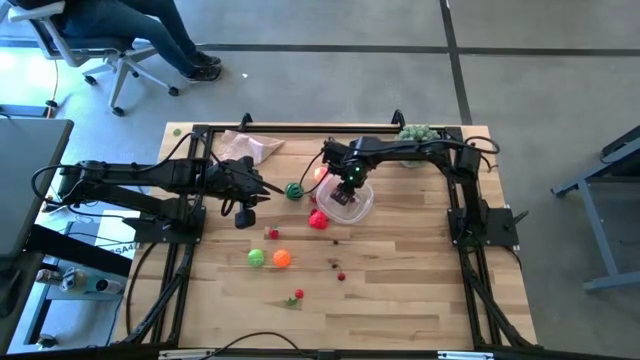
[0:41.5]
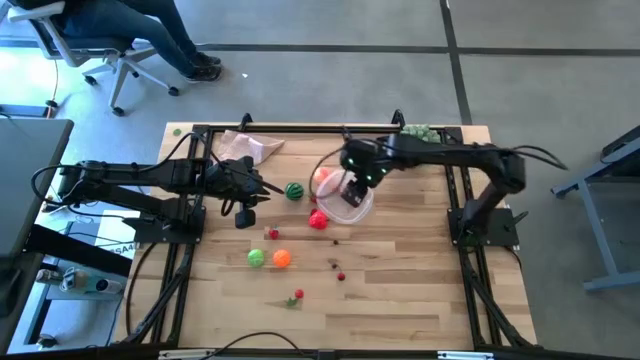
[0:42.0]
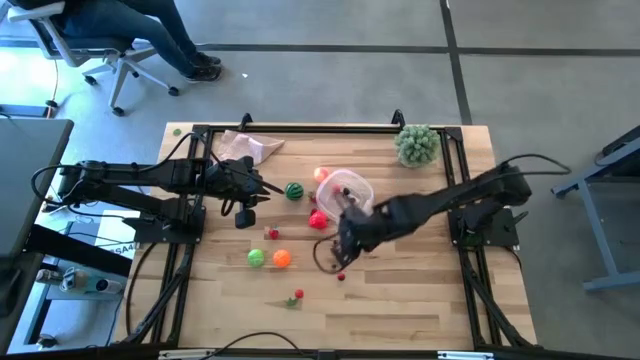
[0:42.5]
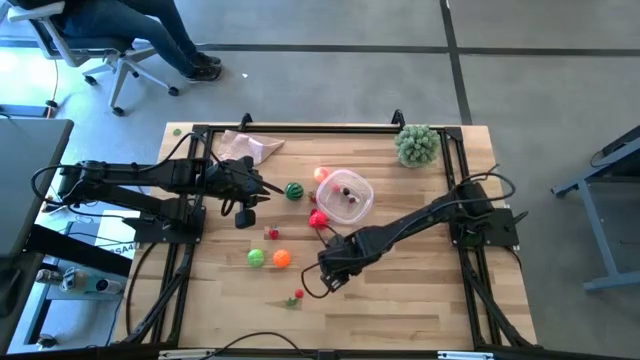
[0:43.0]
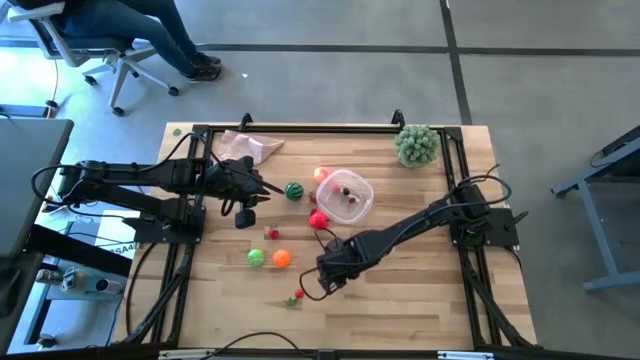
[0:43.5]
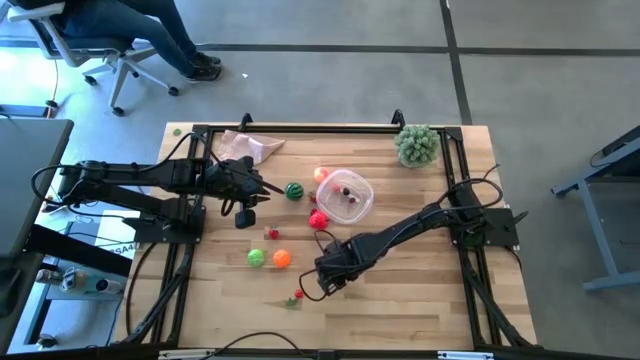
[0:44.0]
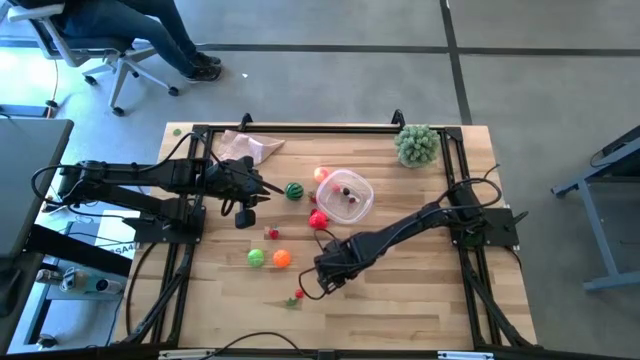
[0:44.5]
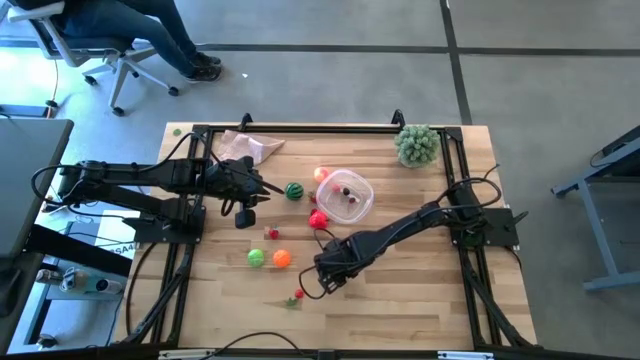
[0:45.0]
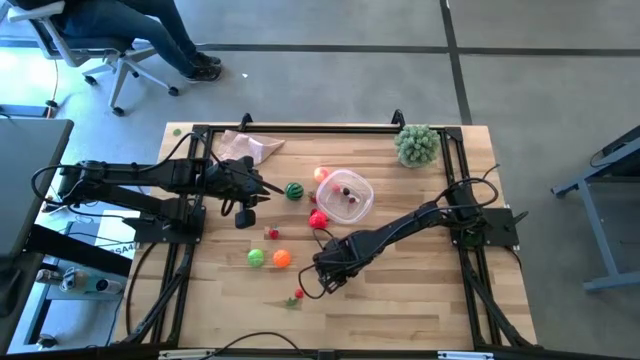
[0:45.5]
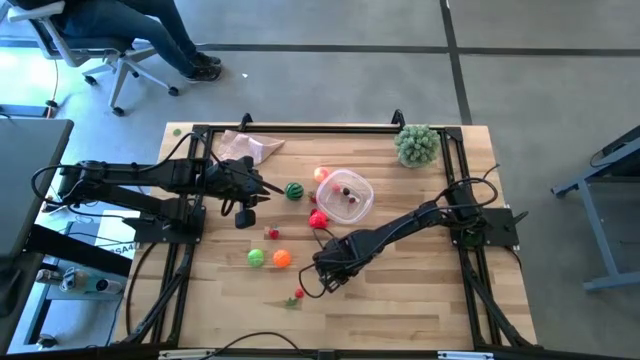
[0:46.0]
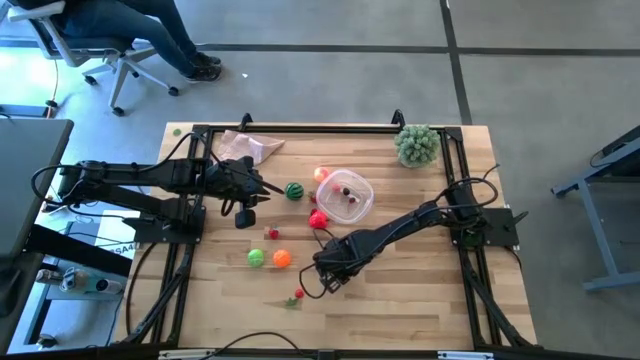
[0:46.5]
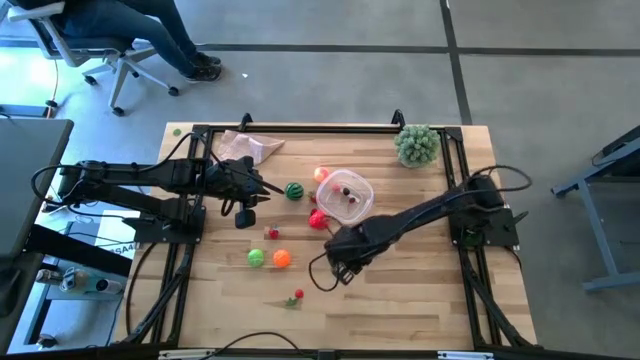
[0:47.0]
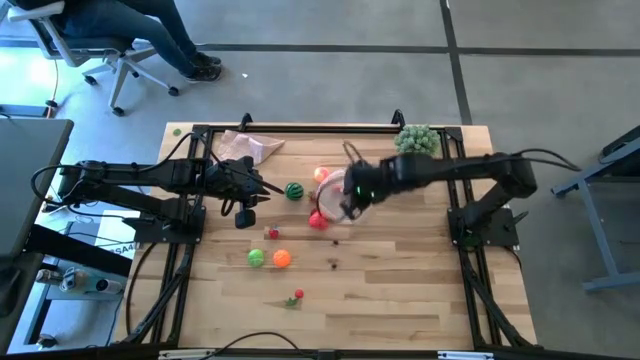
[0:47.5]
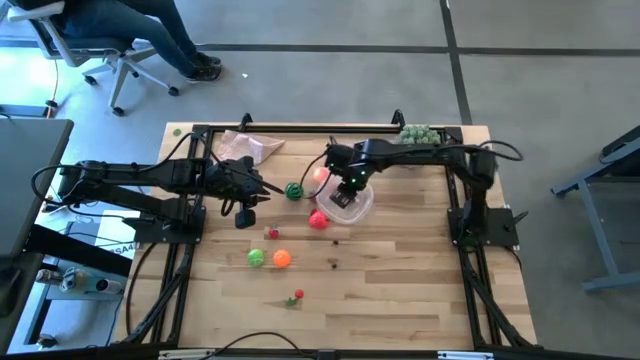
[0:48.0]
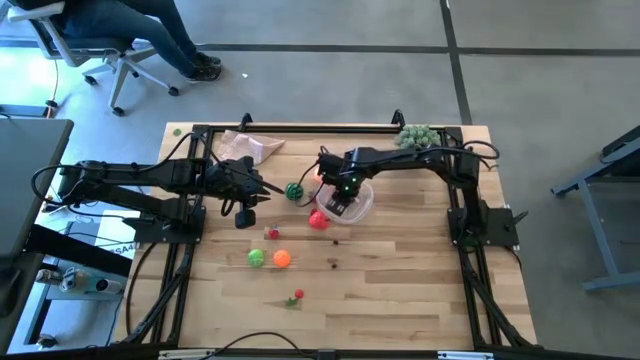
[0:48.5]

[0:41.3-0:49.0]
Task: Pick and placing Produce into tupperware
Put the cherry into the transparent bin

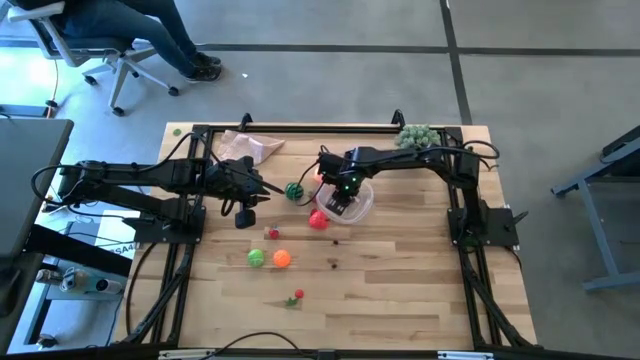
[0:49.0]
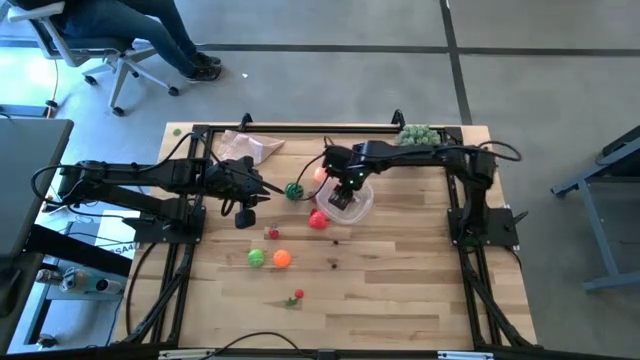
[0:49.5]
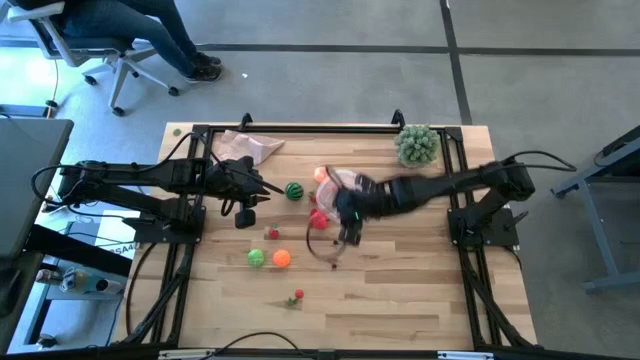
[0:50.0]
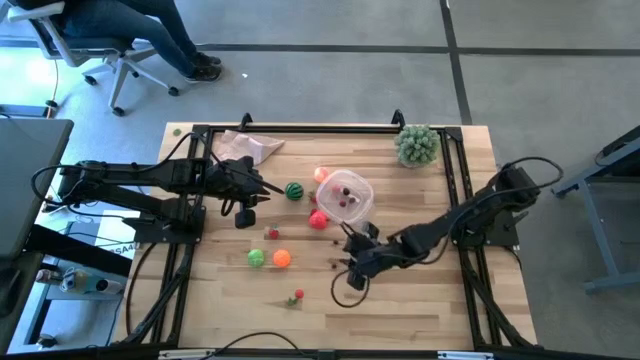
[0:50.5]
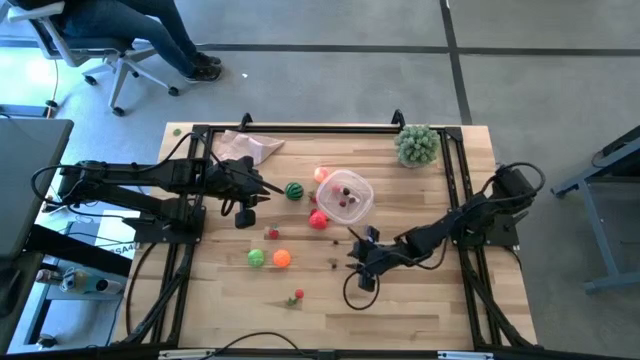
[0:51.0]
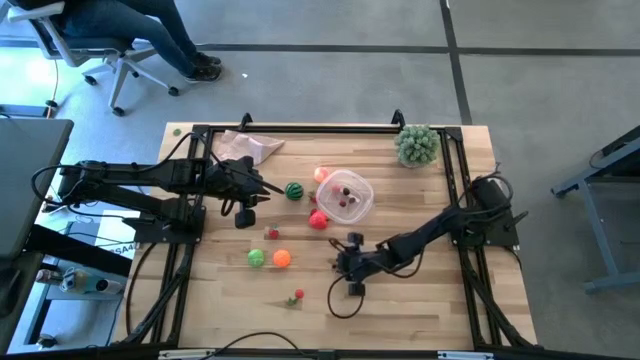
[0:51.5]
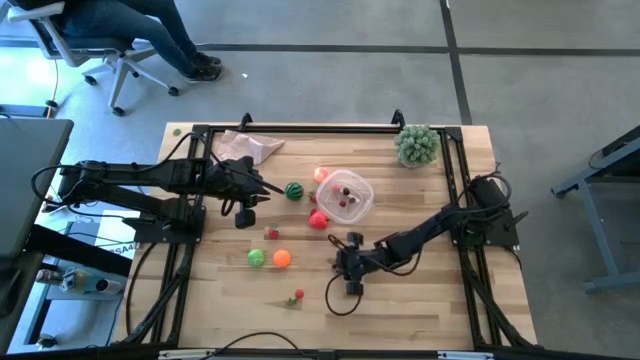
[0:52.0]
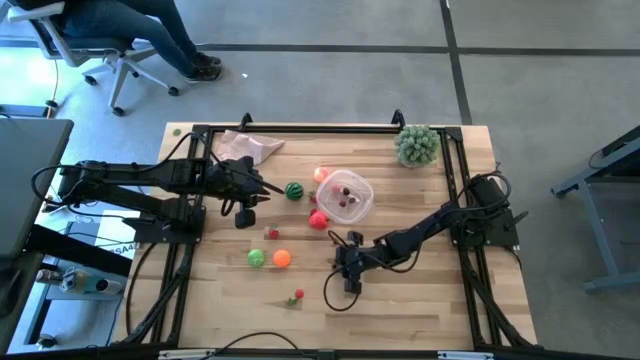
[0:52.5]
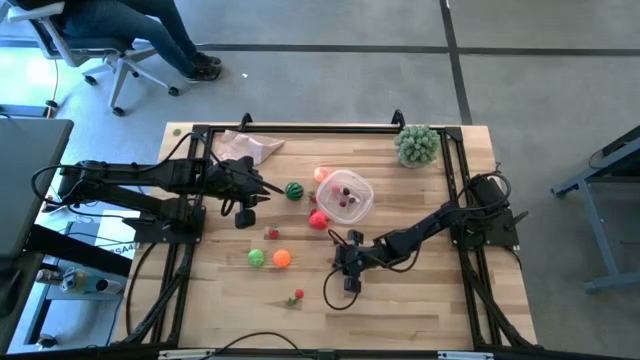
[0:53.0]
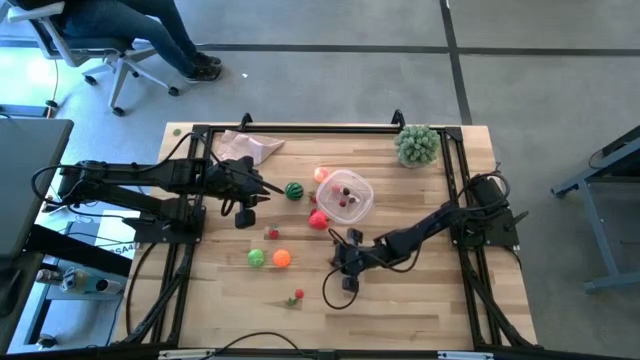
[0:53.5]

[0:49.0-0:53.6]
Put the blueberry into the transparent bin

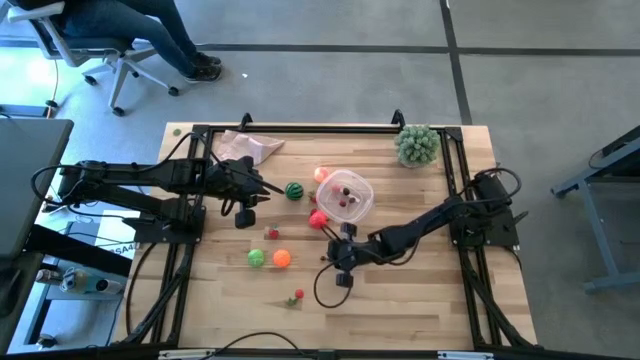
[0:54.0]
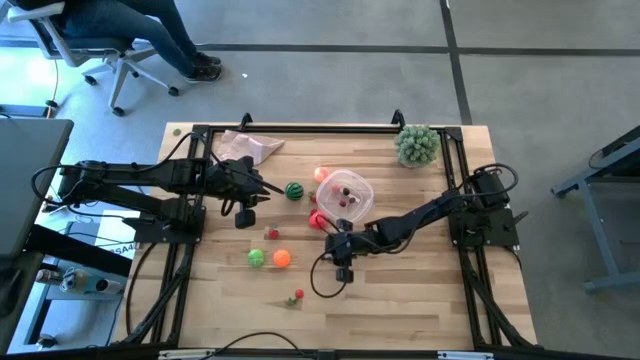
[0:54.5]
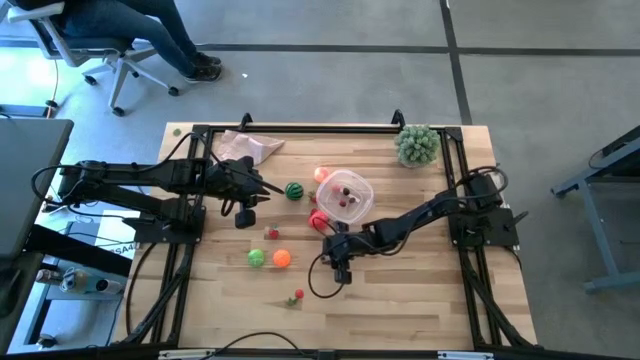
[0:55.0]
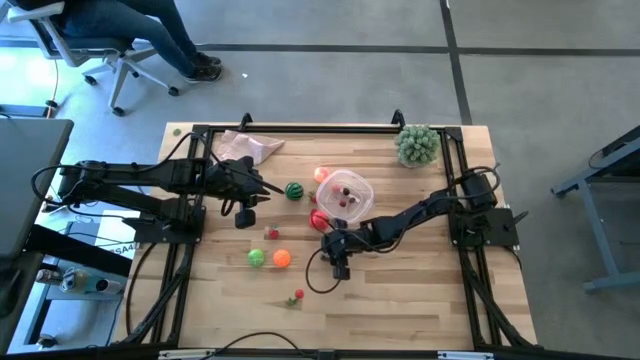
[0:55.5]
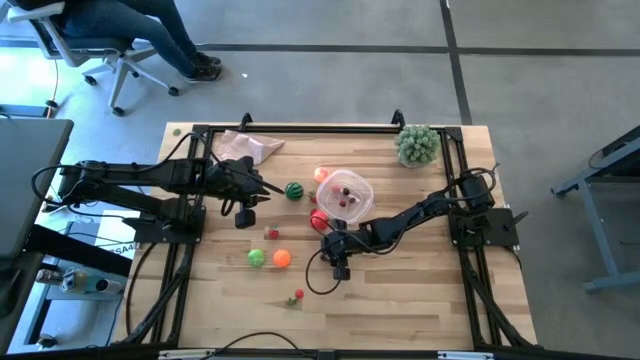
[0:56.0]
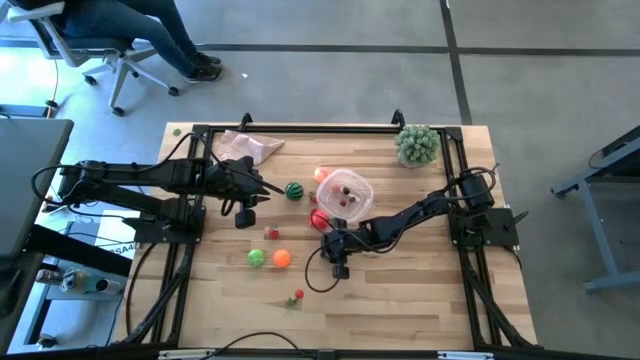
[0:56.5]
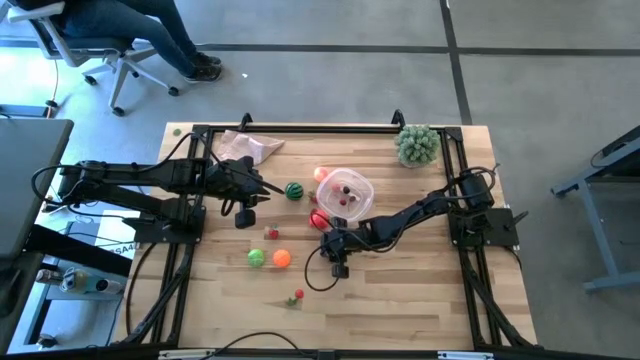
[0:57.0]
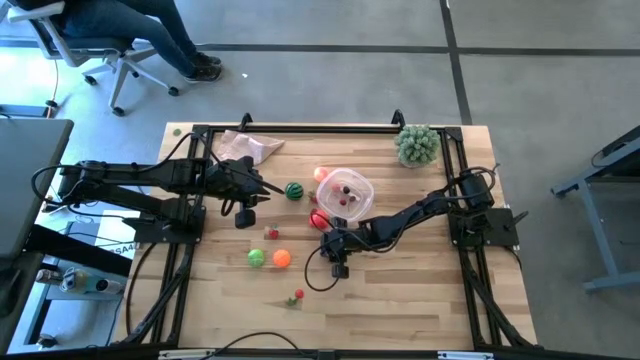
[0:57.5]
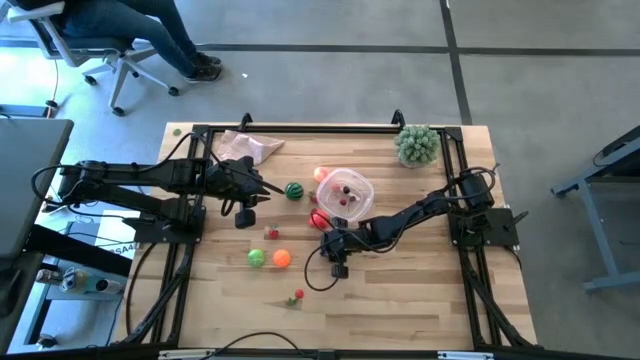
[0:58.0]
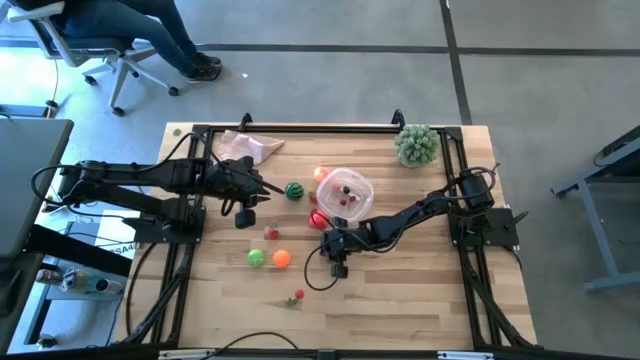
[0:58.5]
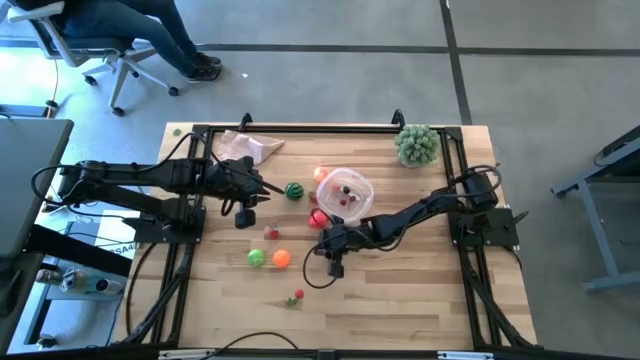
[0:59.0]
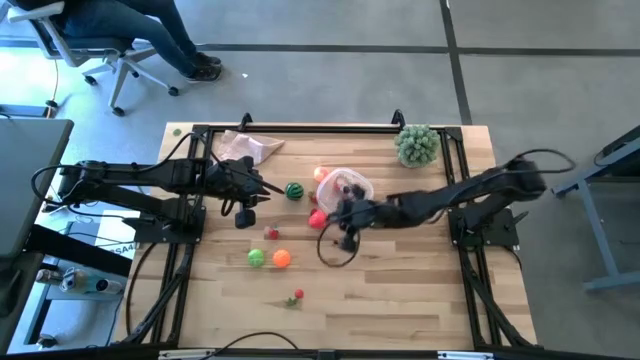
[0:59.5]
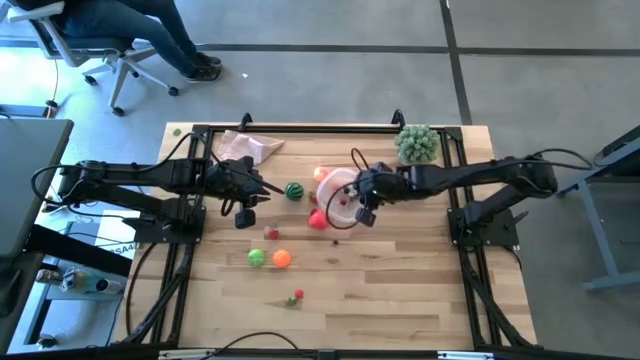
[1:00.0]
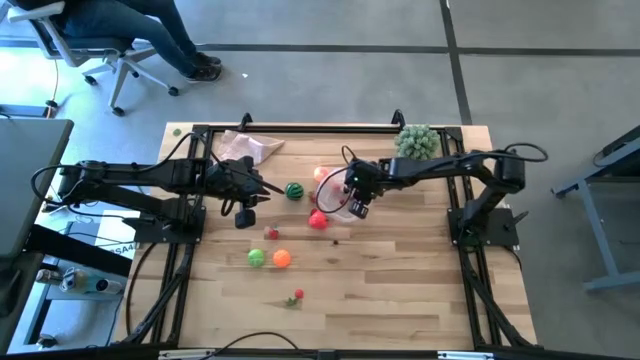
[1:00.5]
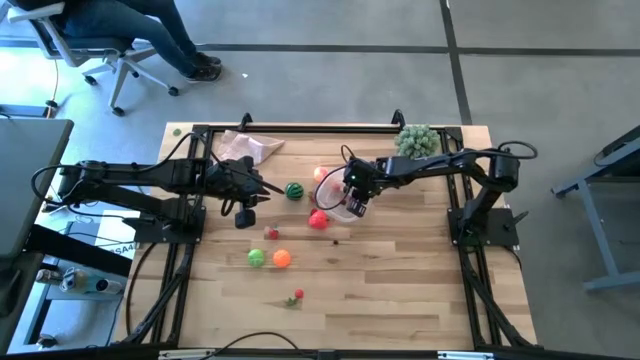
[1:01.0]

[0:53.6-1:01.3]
Put the blueberry into the transparent bin

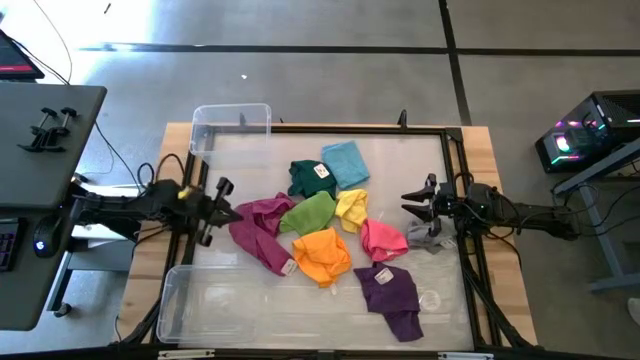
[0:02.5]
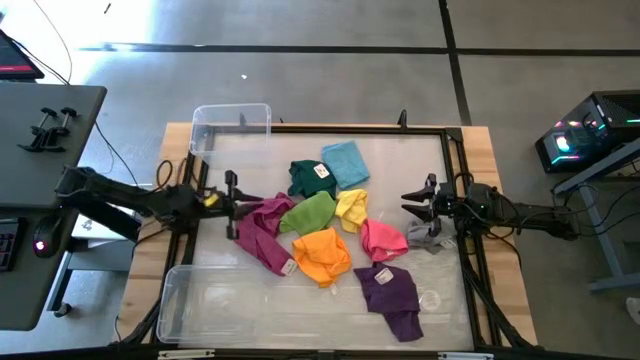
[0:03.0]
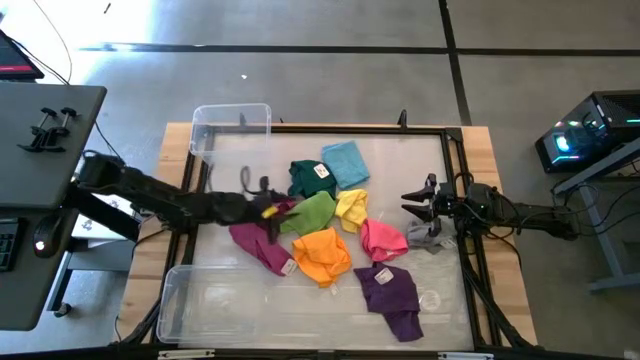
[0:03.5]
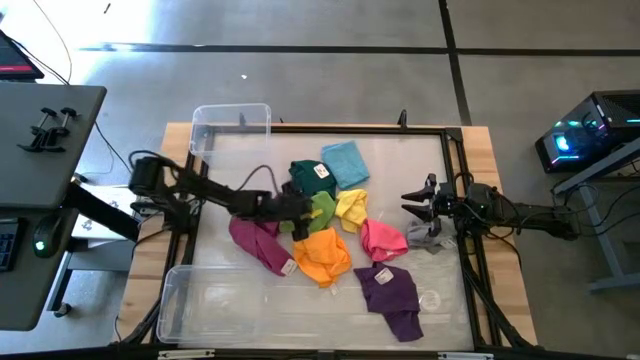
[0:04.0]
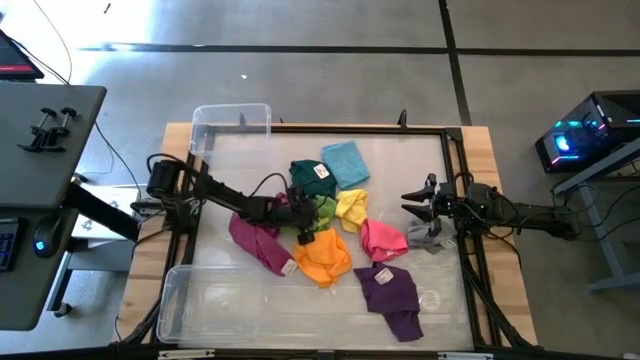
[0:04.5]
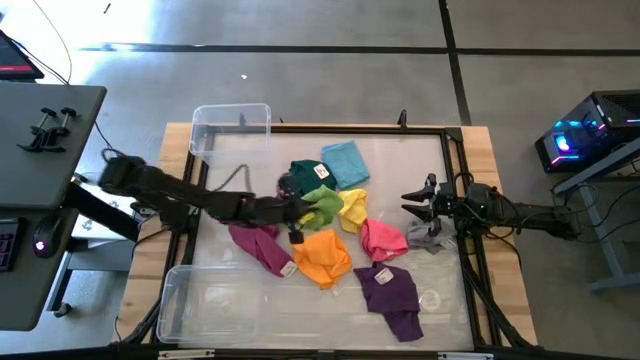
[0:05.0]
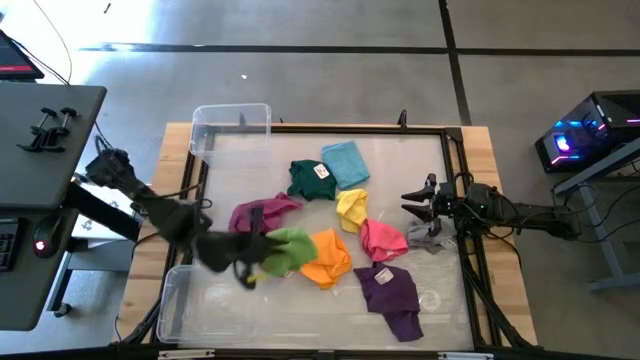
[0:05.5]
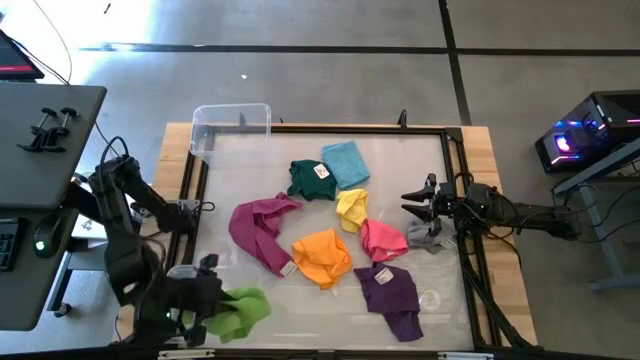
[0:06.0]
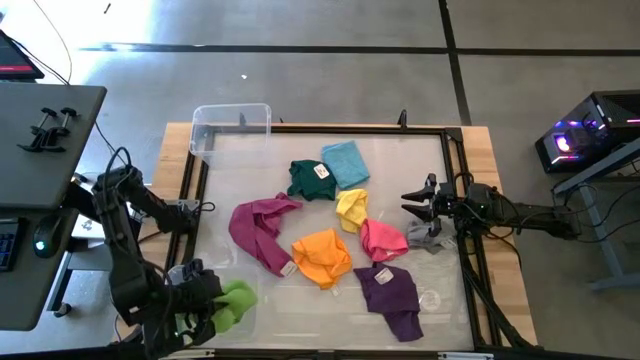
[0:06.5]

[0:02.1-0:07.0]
Task: Sort towels by color in basket
Put the green towel into the bottom transparent bin
